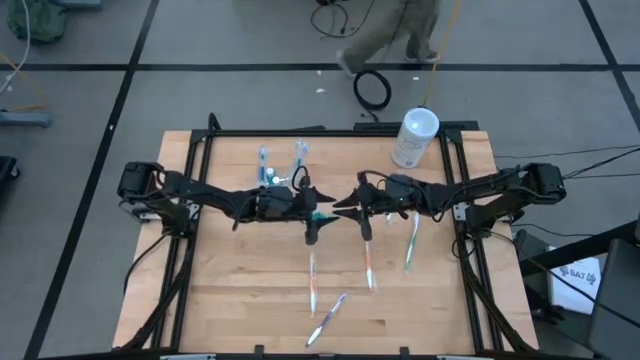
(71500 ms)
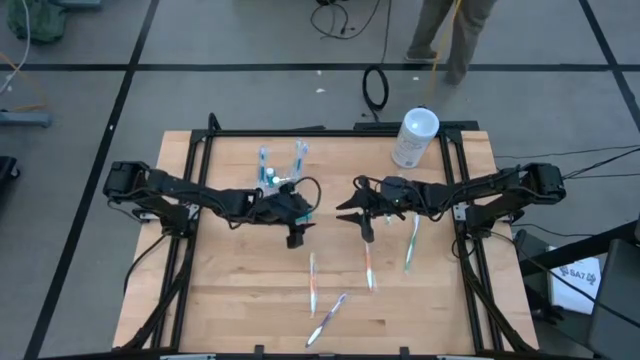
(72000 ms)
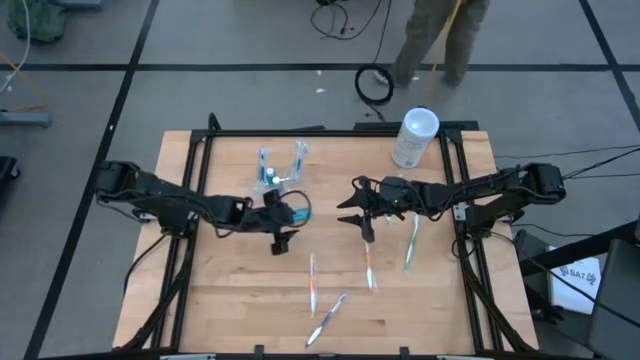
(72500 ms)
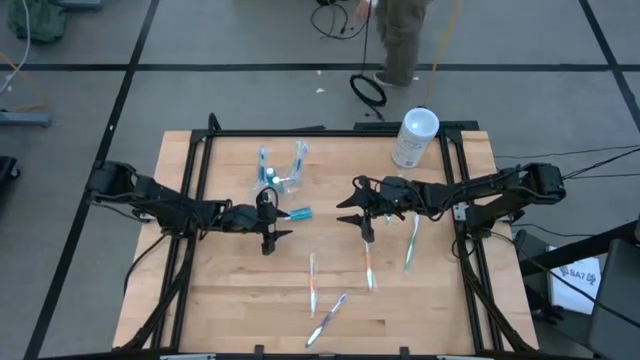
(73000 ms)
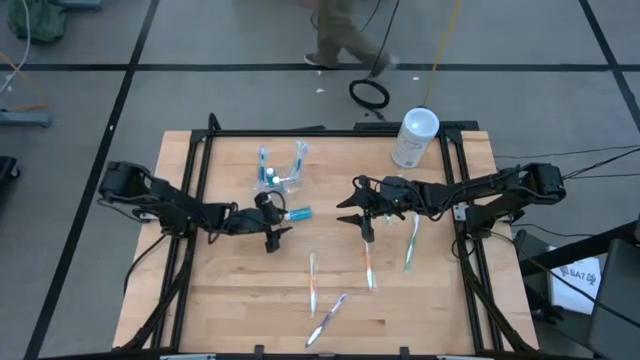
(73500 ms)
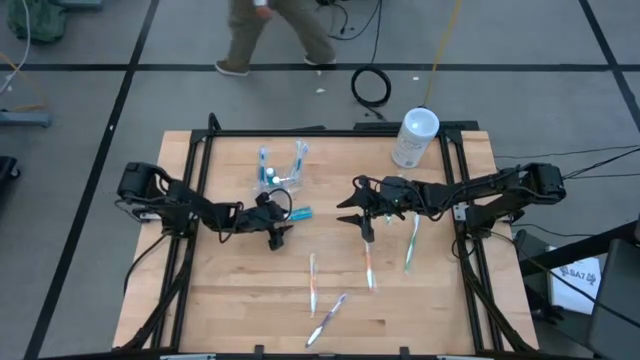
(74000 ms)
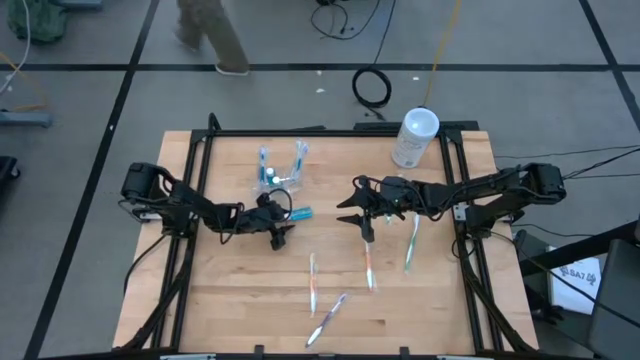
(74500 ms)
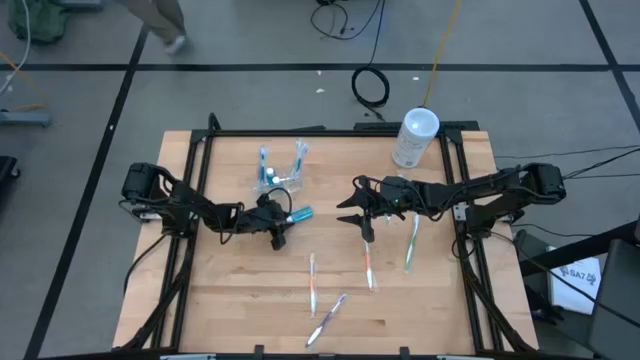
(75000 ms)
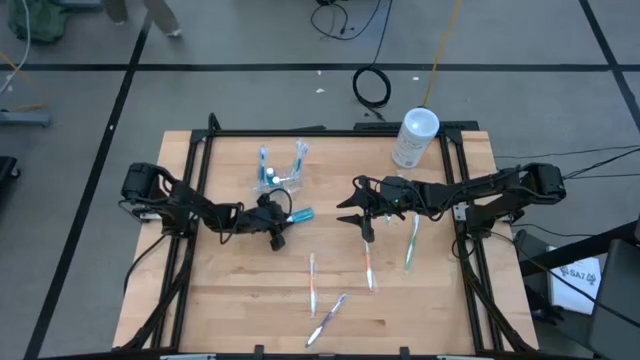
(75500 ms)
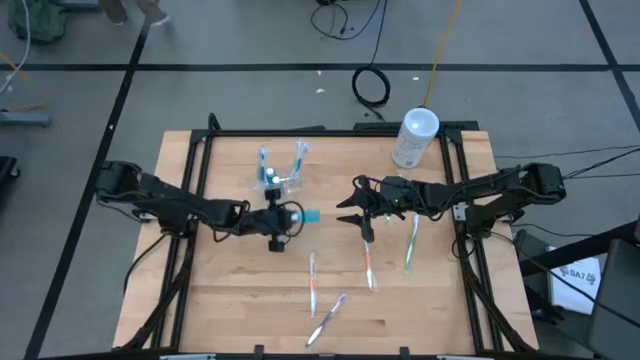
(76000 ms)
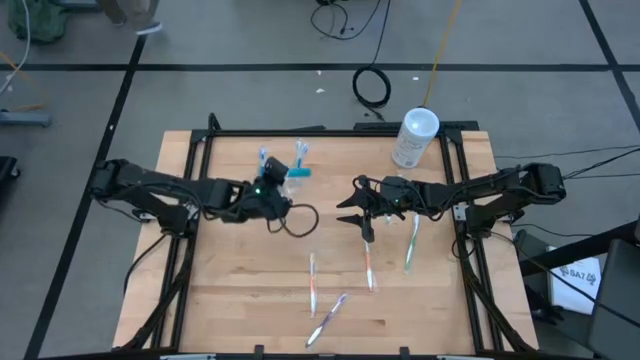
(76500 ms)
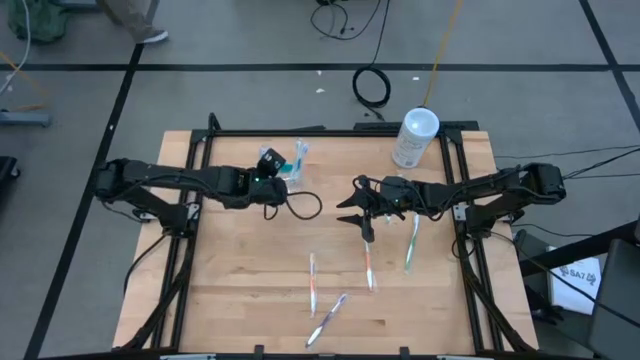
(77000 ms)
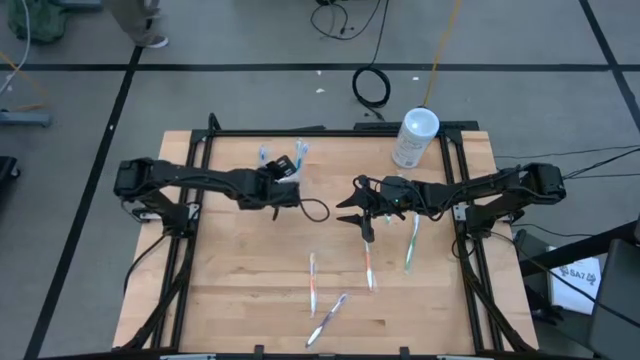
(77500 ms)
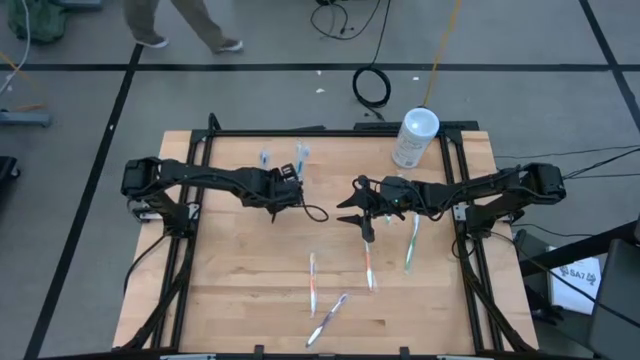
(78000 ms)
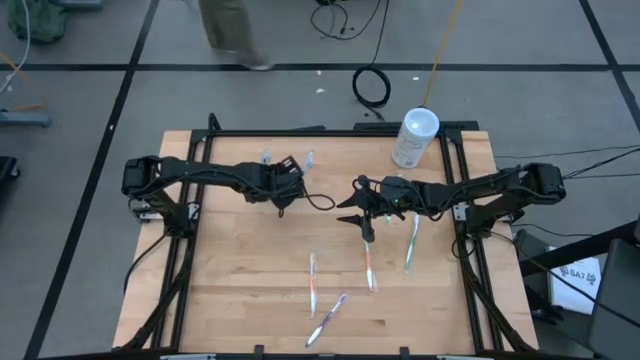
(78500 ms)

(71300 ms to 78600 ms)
Task: Pick & Place toothbrushing station
Put the blue mouthwash into the middle compartment of the transparent organizer

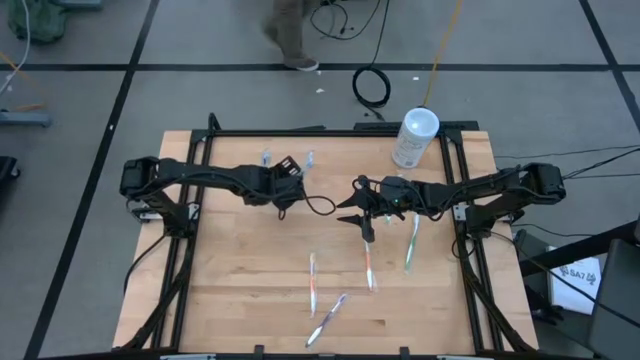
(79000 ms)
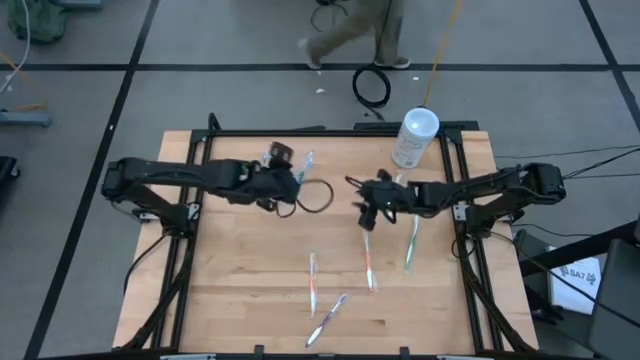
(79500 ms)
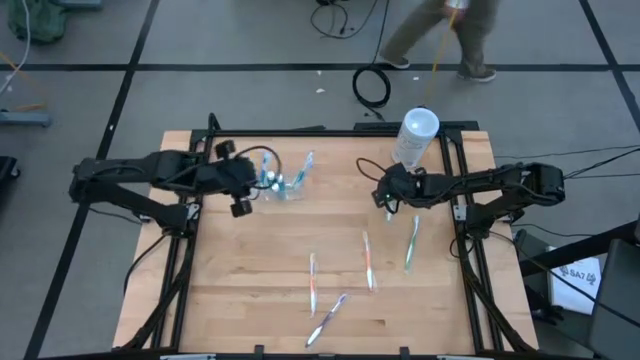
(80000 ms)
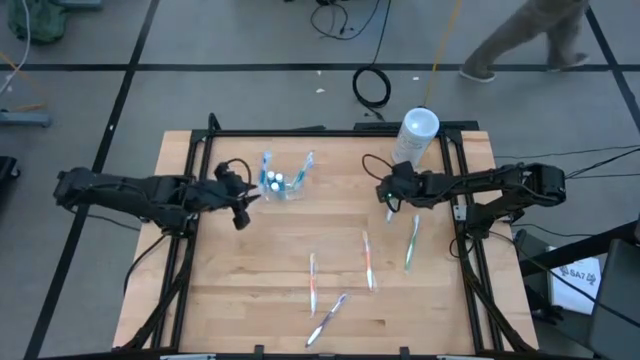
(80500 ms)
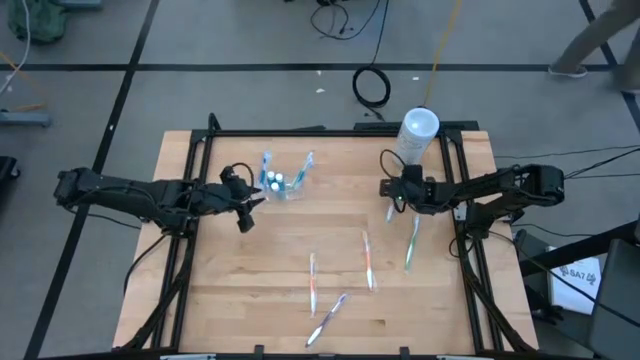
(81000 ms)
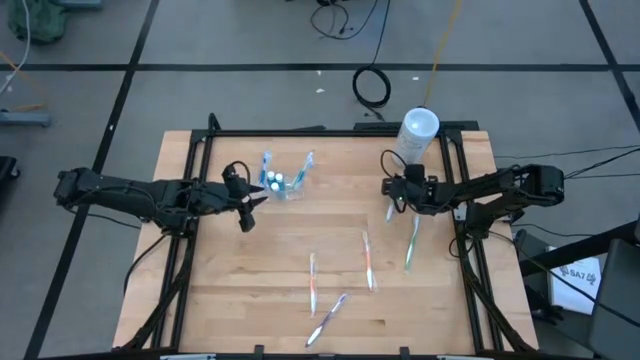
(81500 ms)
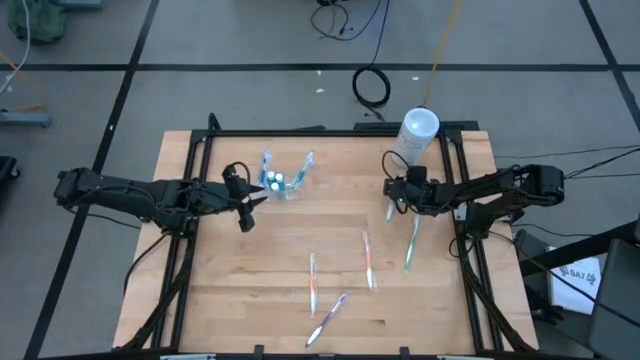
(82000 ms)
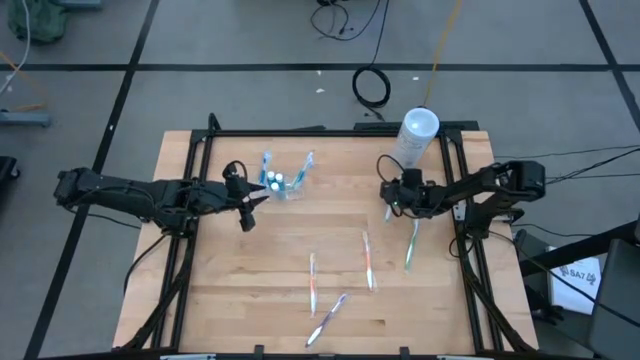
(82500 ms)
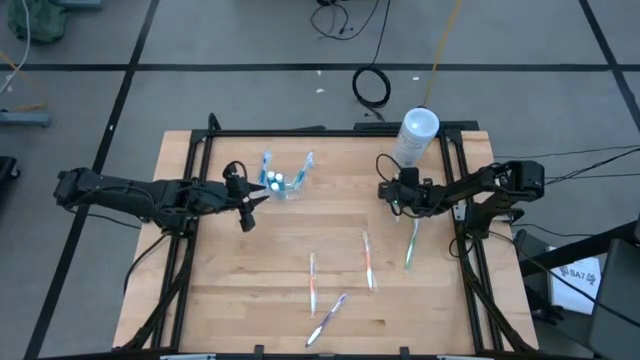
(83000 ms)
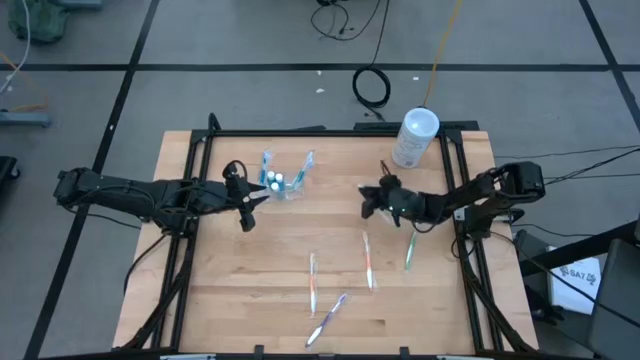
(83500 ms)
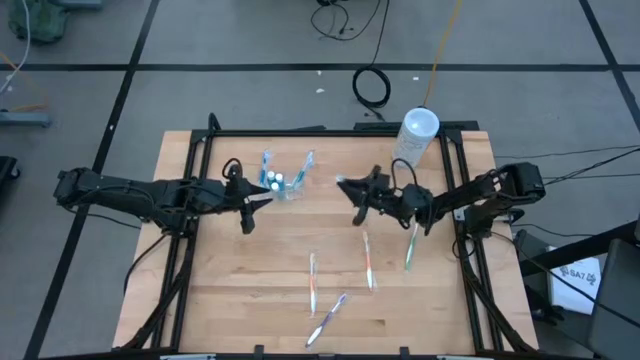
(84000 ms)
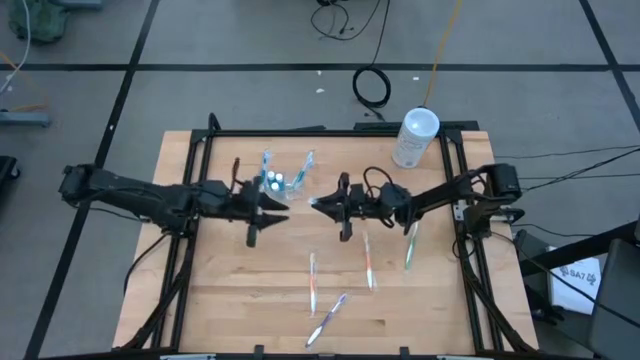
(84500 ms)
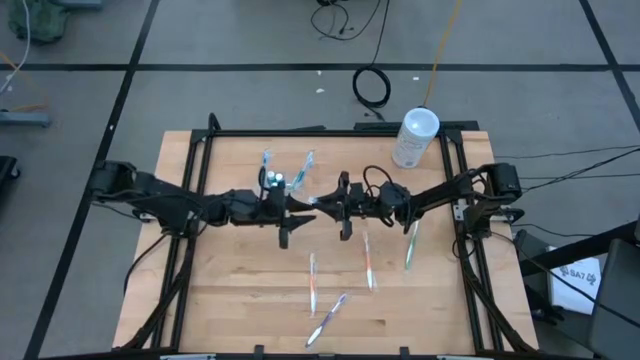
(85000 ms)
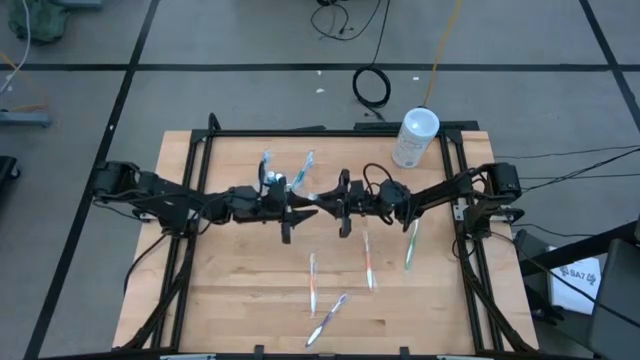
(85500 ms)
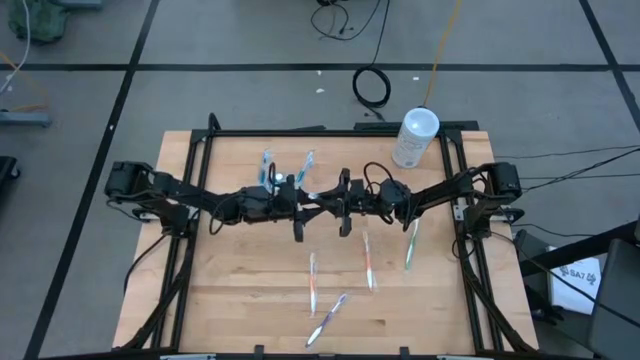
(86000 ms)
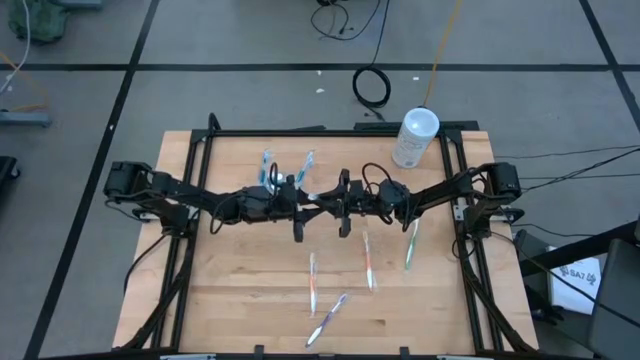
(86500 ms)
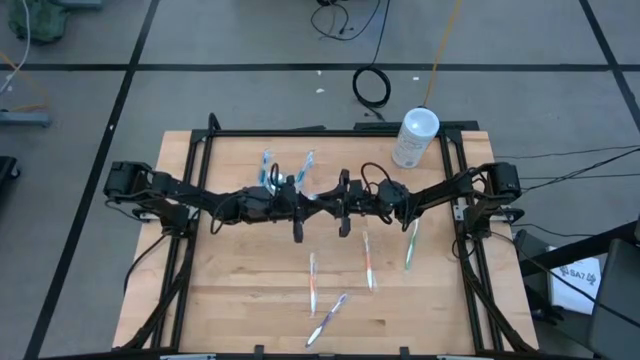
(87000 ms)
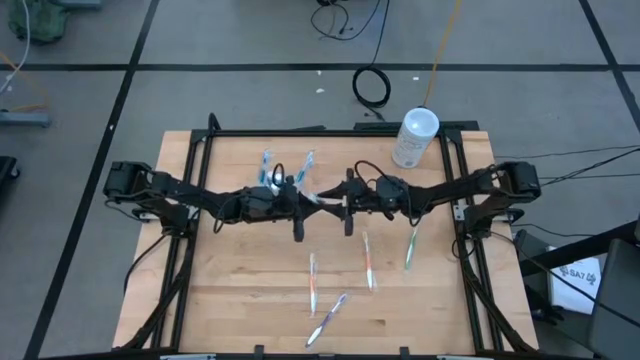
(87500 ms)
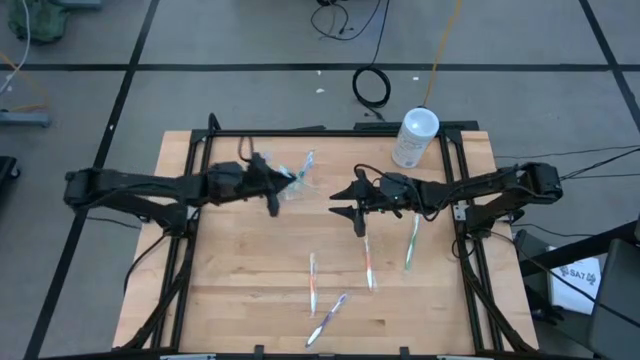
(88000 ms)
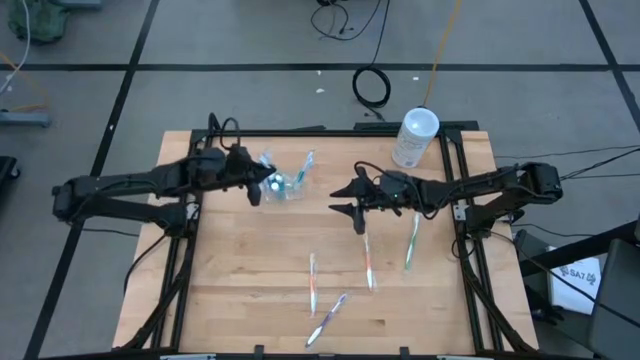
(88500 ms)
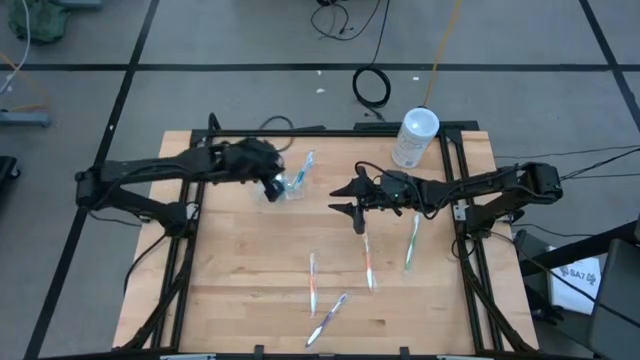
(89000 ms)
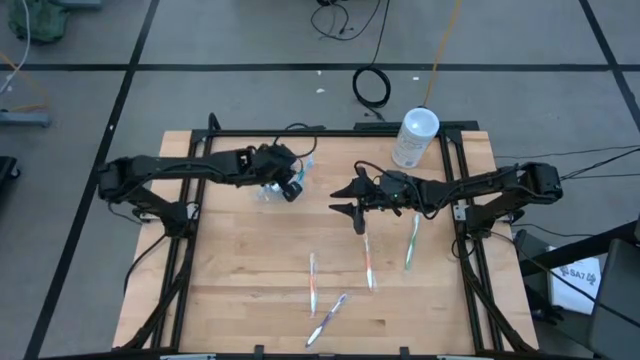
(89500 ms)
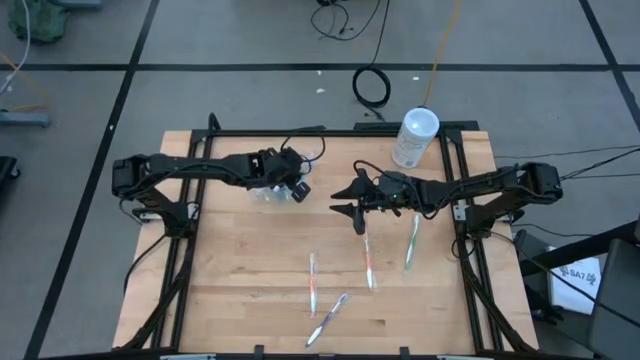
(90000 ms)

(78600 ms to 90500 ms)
Put the top green toothbrush into the right compartment of the transparent organizer

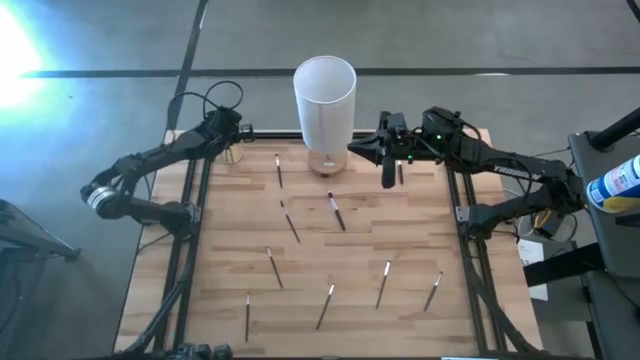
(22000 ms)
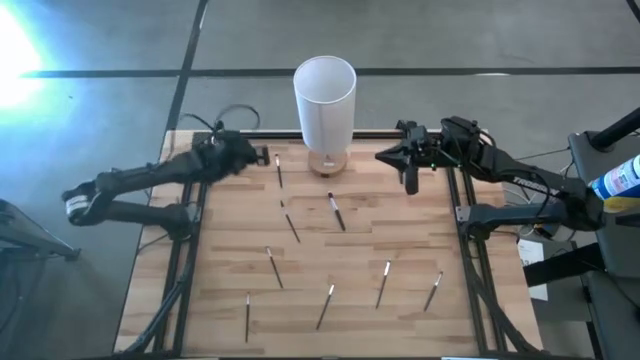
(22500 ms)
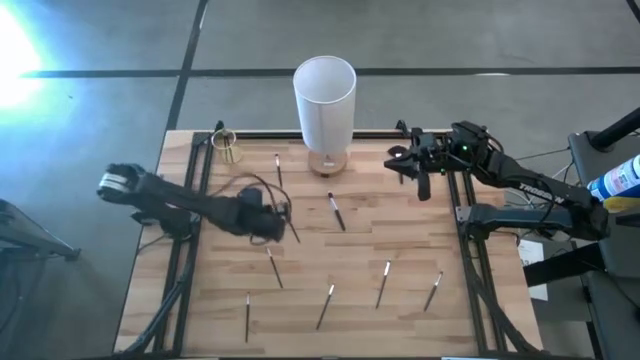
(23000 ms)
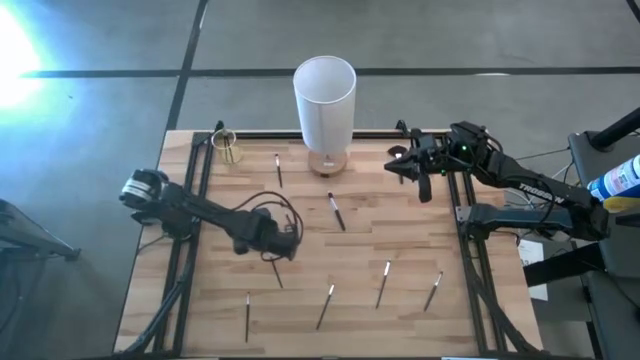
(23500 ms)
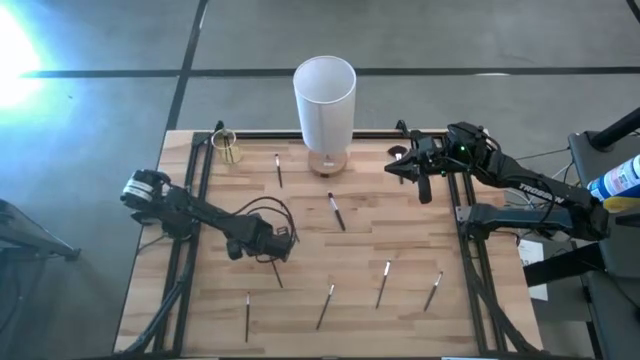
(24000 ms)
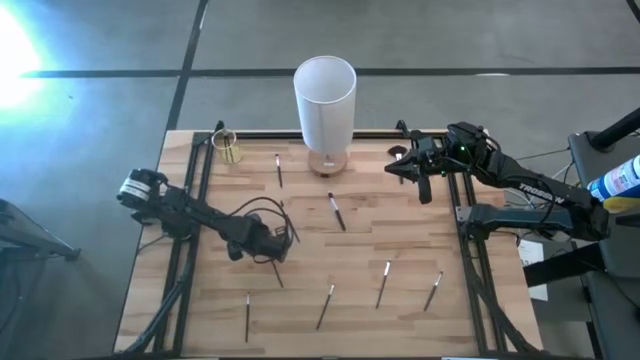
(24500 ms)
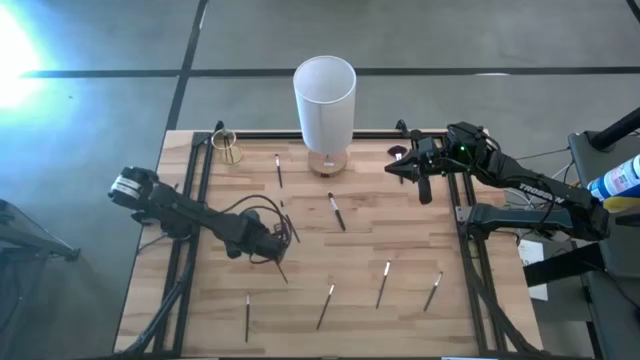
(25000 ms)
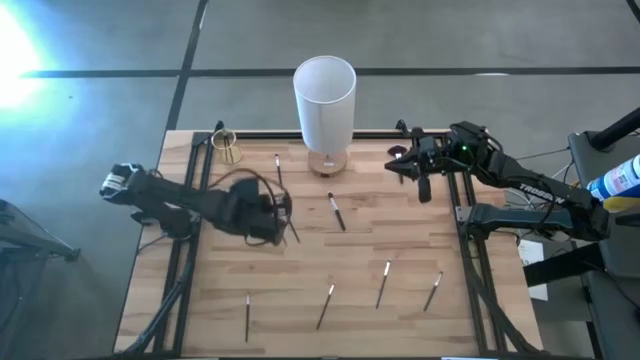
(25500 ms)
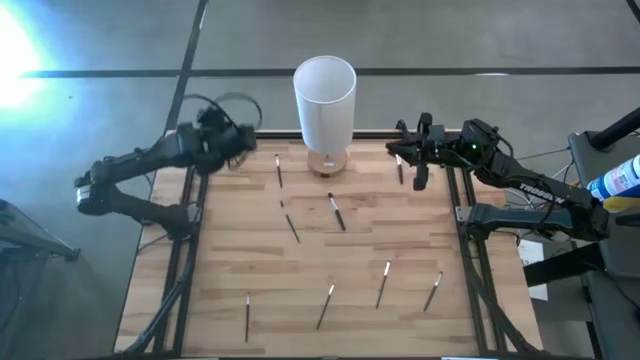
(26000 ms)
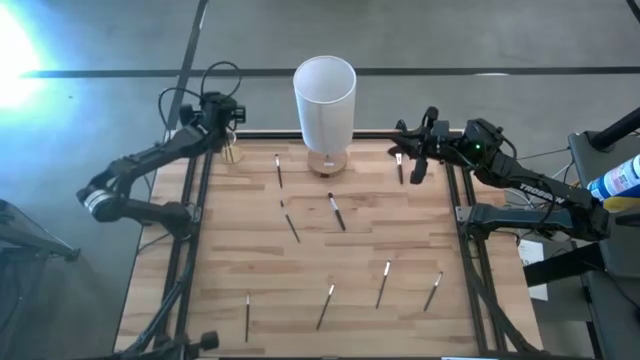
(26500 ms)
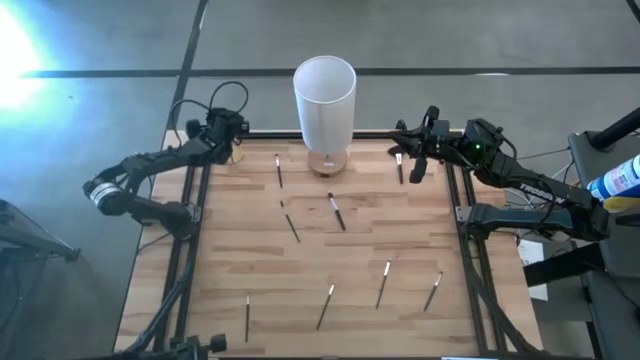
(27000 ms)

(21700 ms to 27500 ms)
Task: Pick & Place Makeup Brushes
Put the eyeshadow brush into the makeup holder
